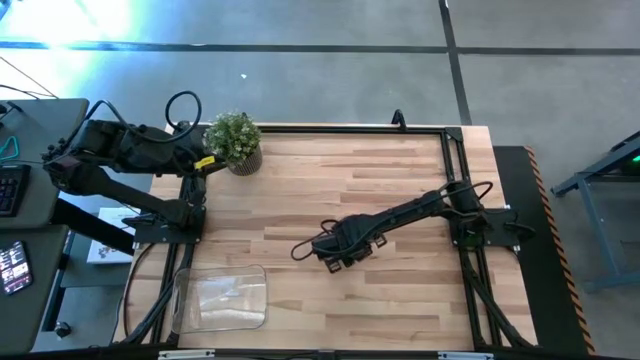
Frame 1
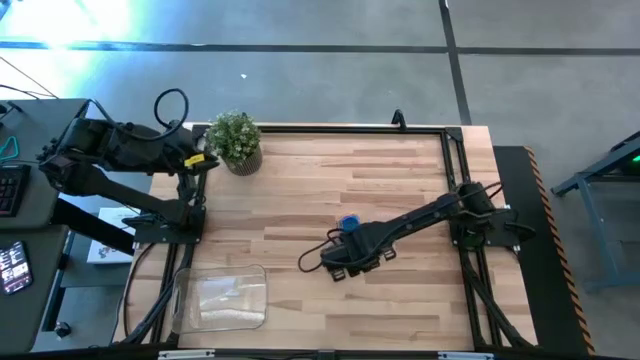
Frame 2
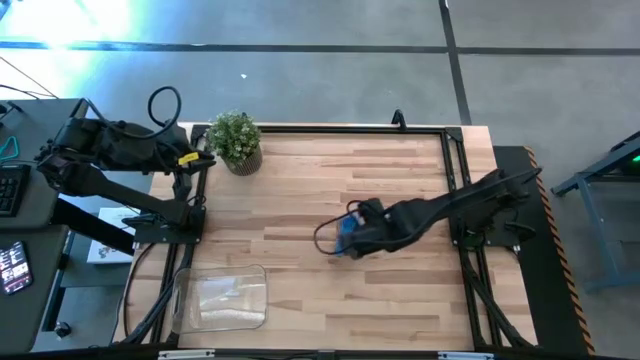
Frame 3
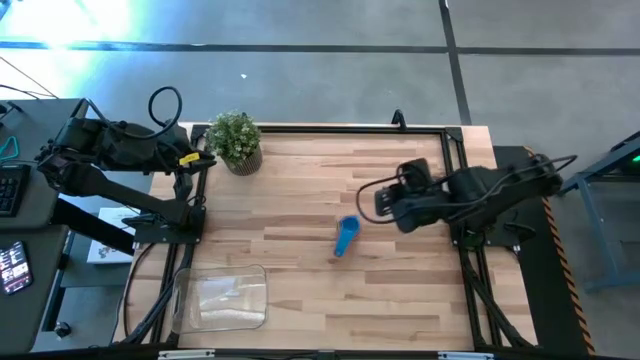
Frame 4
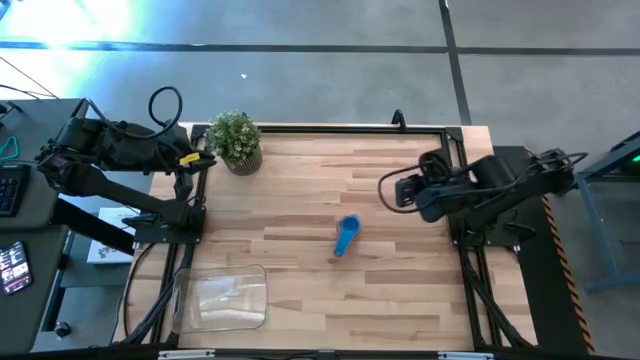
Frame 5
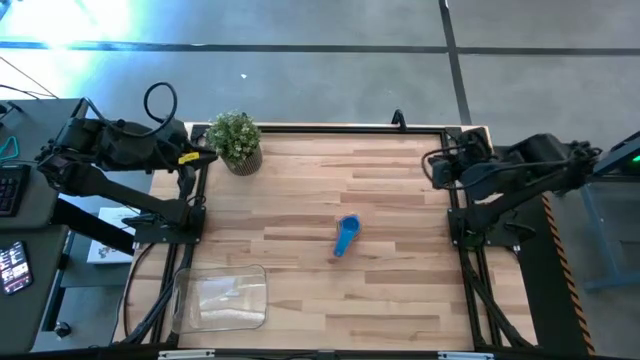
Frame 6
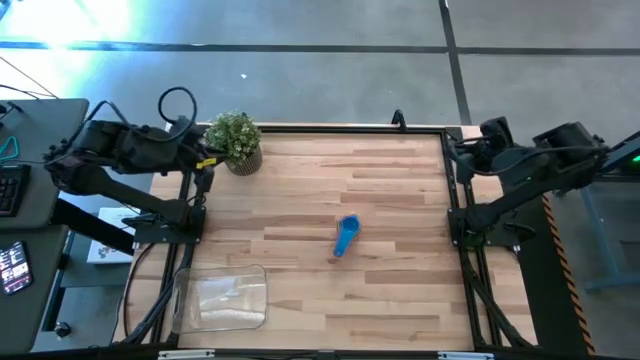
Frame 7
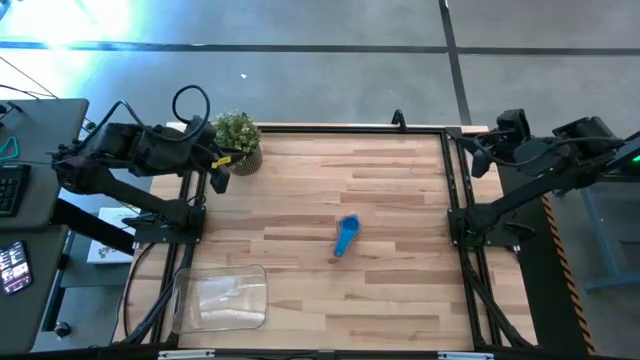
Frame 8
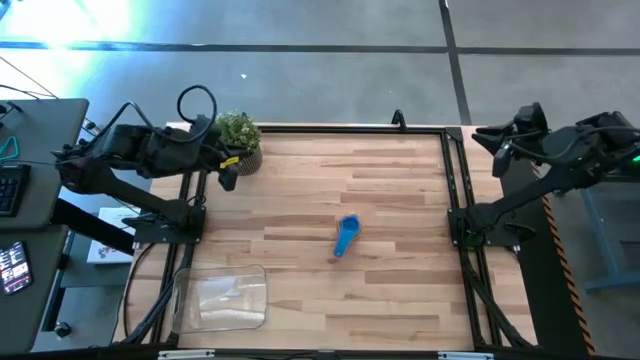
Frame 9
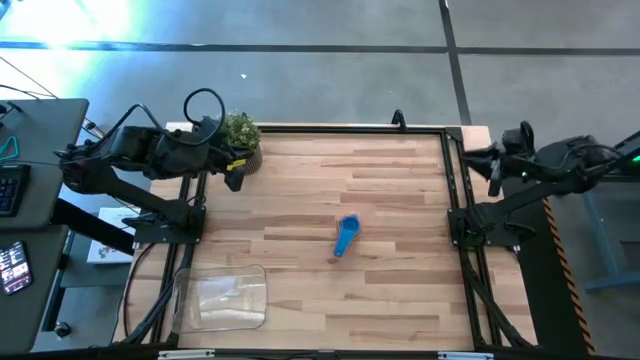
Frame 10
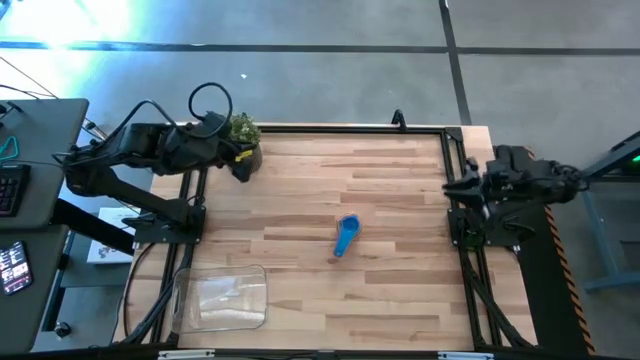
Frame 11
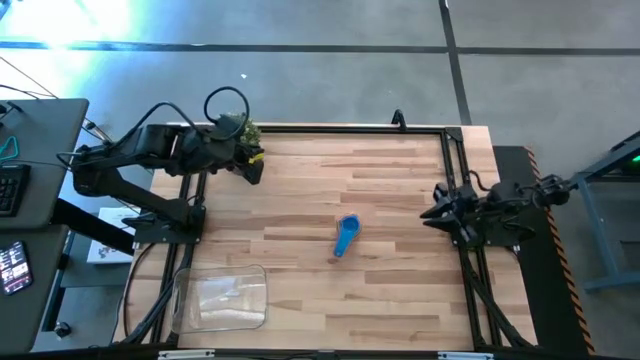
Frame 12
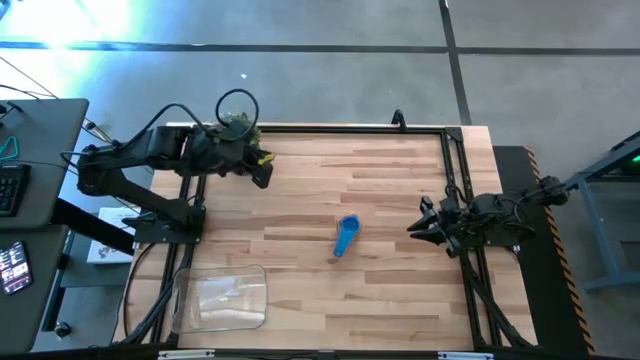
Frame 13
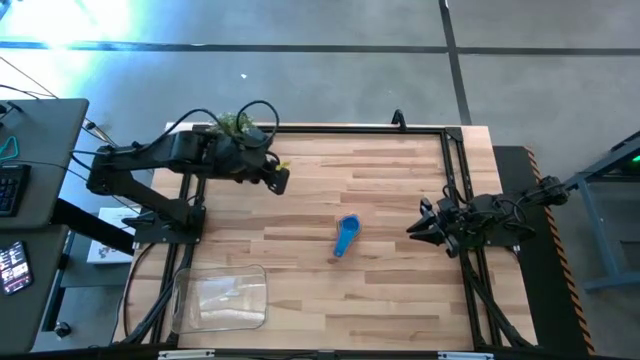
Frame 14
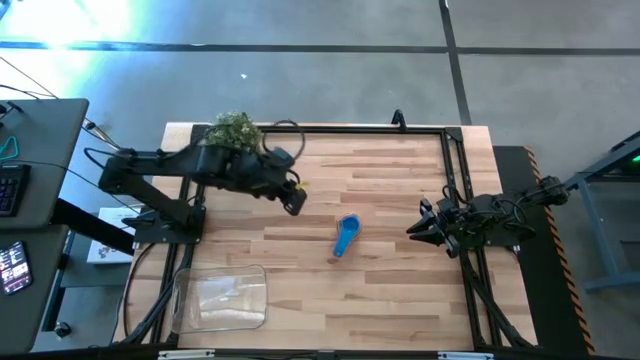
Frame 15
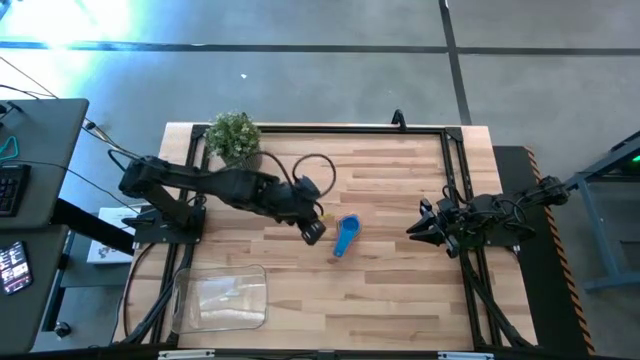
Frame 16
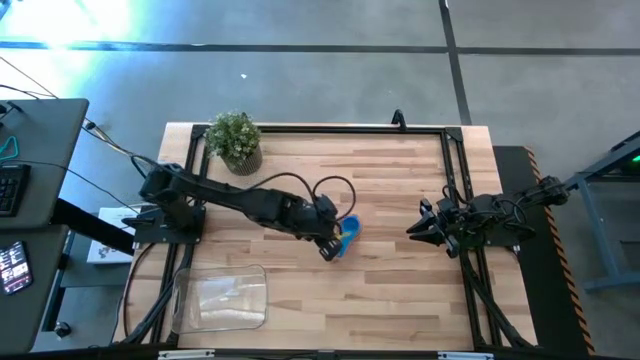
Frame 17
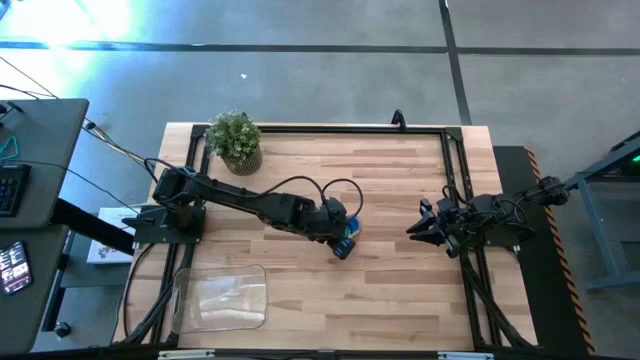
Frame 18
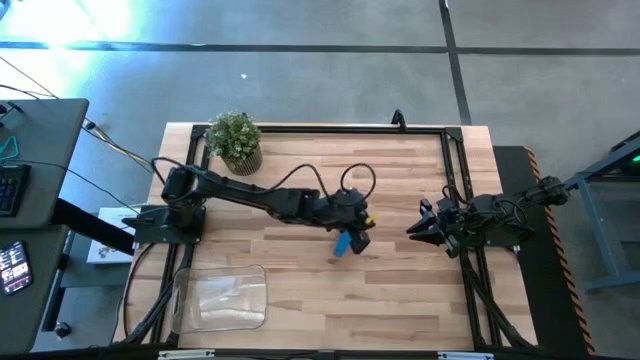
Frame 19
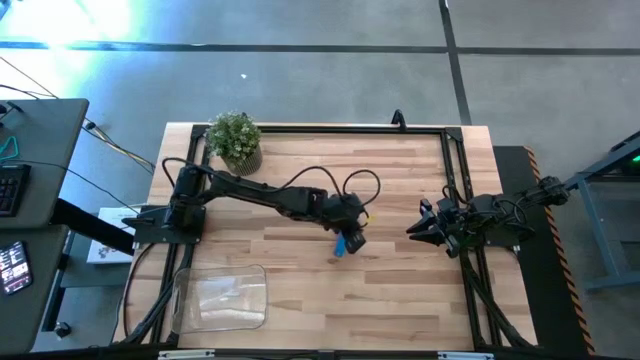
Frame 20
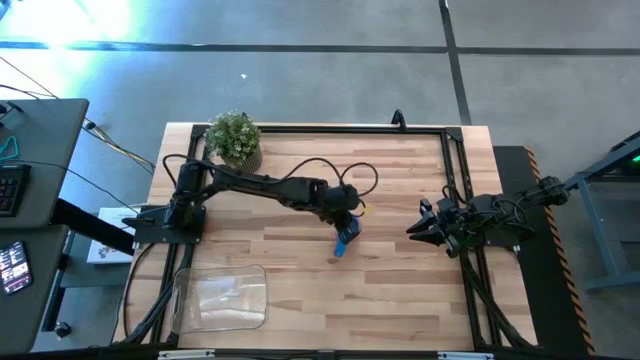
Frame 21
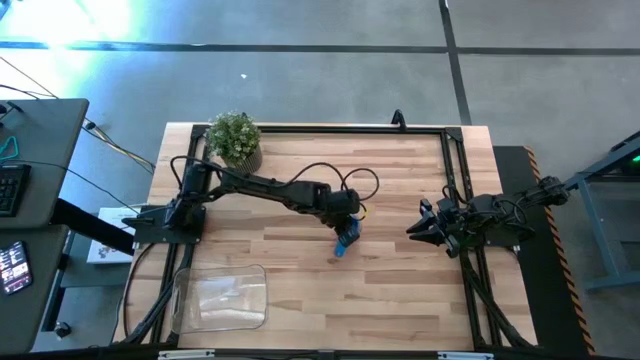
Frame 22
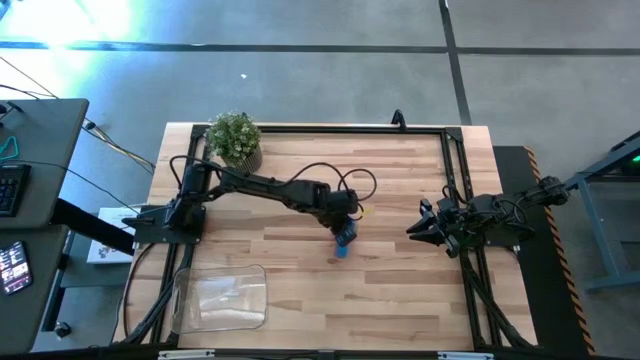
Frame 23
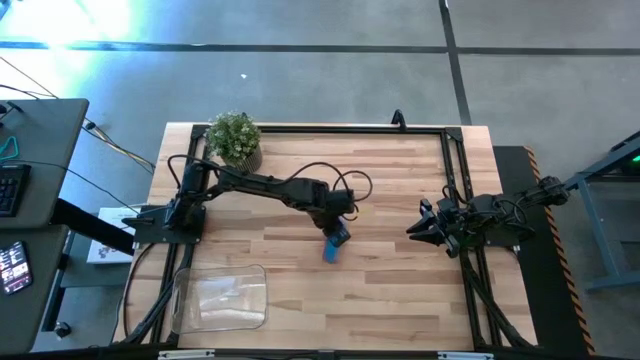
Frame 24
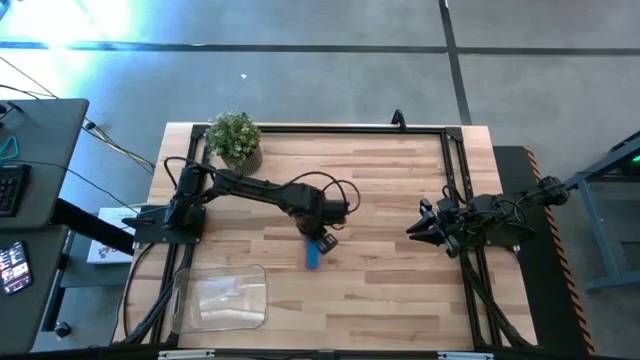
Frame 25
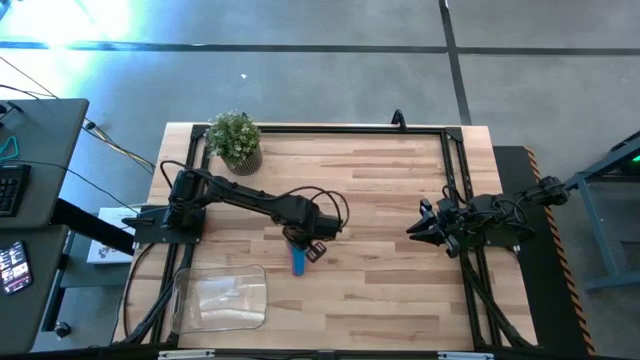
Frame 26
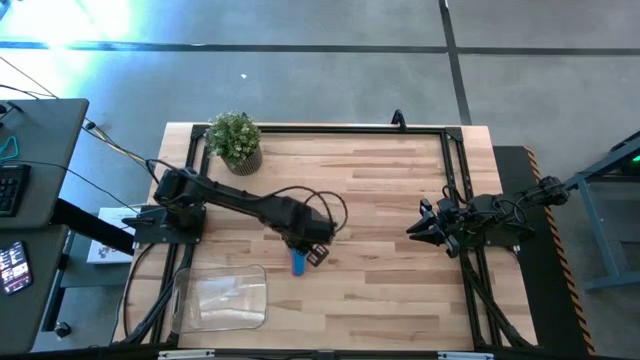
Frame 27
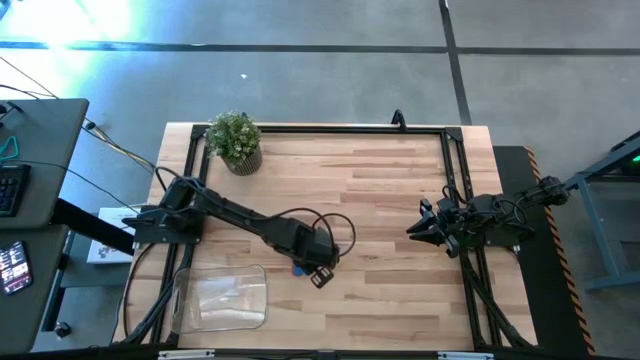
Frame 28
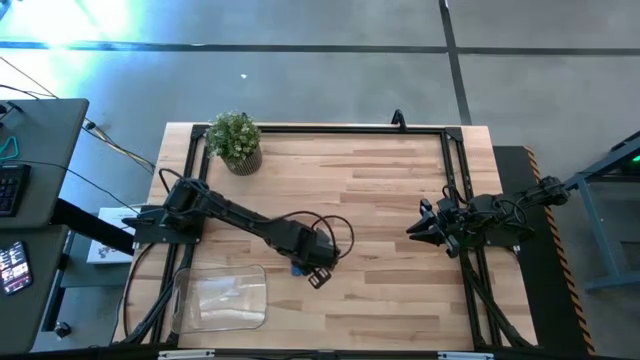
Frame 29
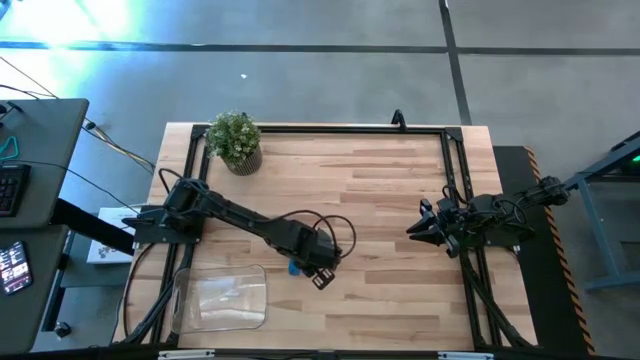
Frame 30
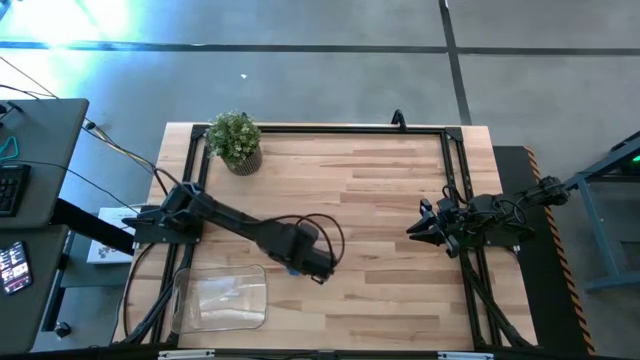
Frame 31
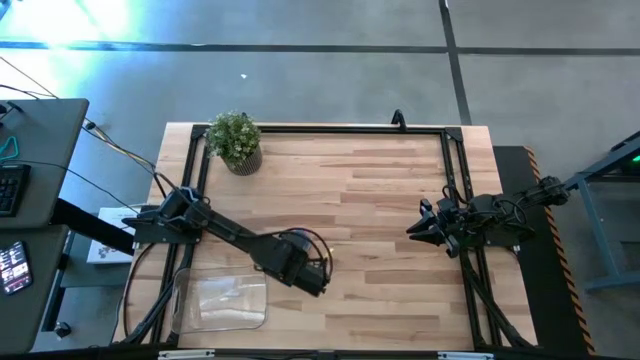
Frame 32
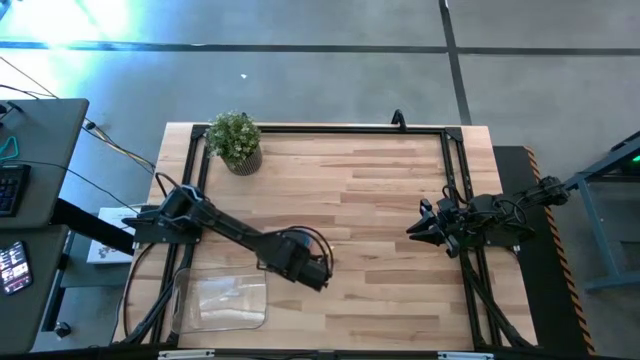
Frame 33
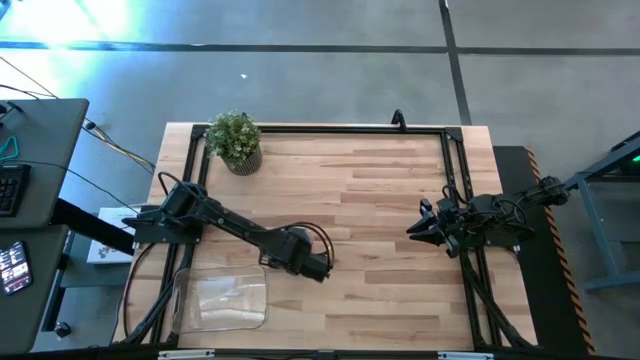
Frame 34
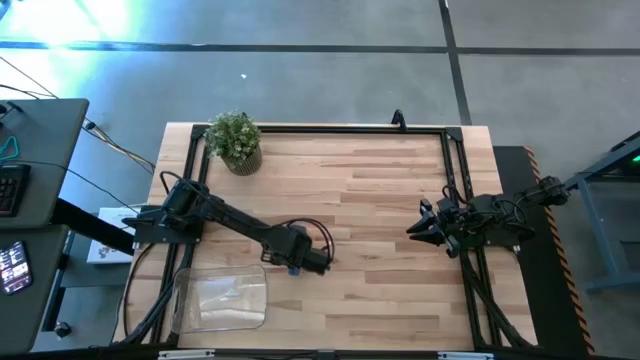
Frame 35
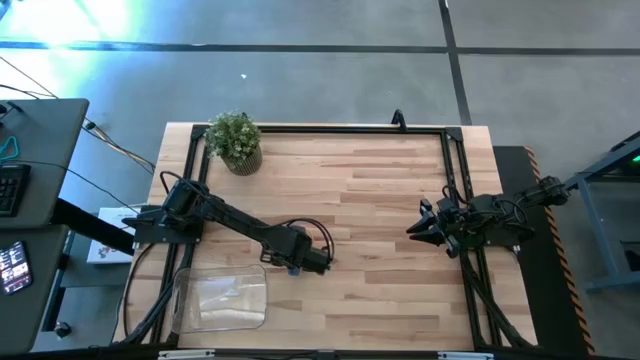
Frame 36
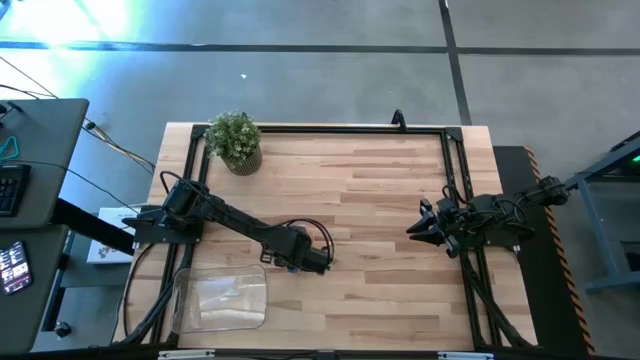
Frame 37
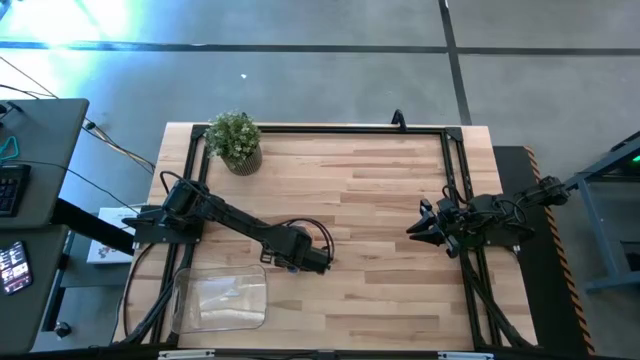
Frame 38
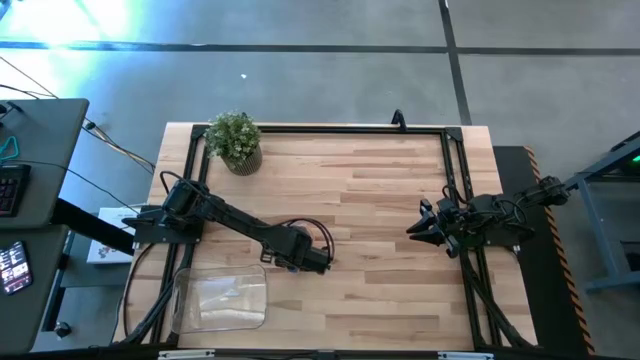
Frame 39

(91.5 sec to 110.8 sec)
Task: Nest measuring cups in basket
Put the nested measuring cups into the transparent bin

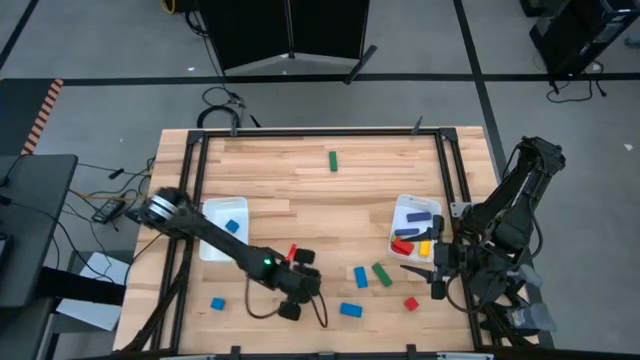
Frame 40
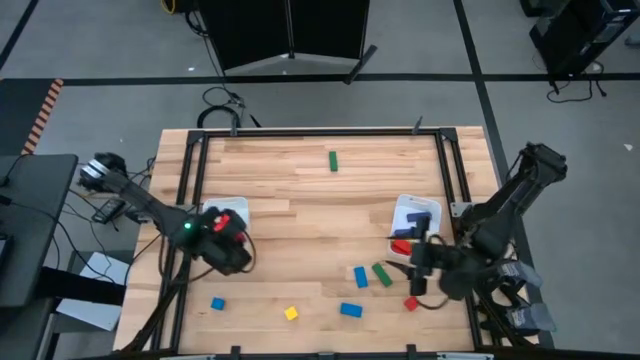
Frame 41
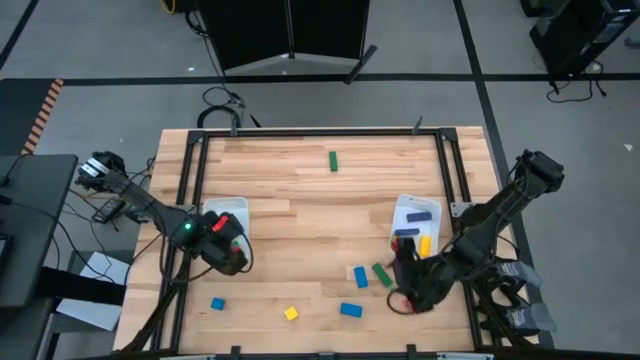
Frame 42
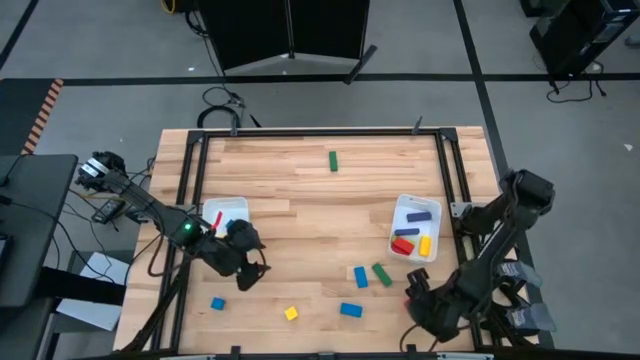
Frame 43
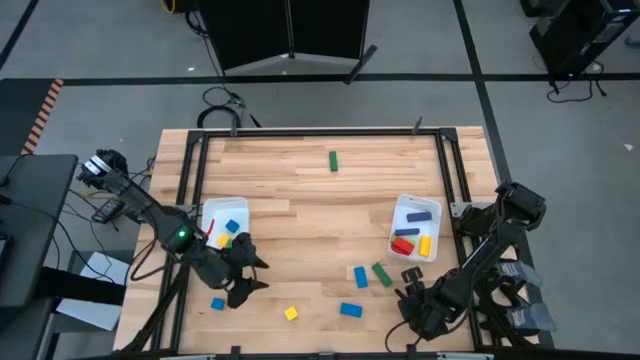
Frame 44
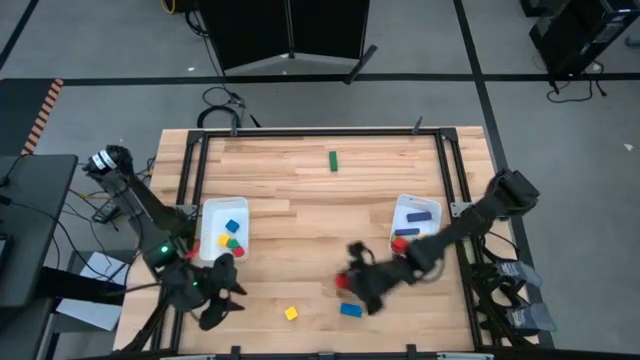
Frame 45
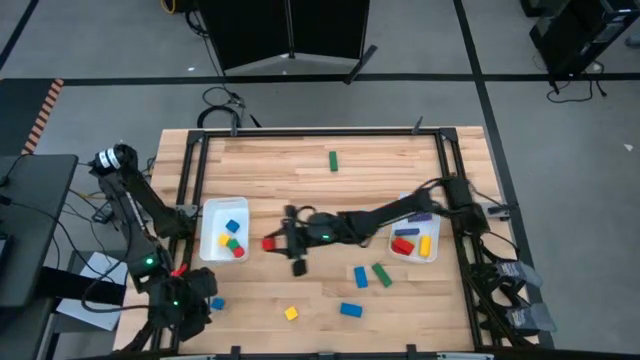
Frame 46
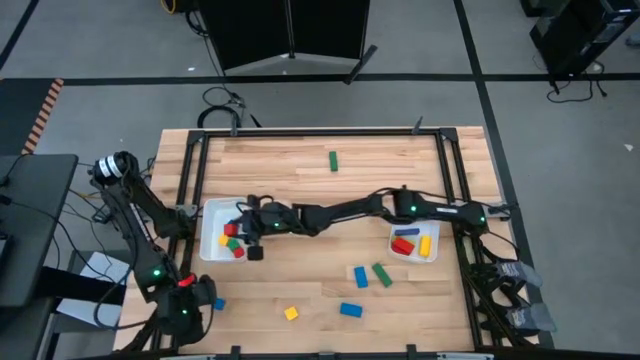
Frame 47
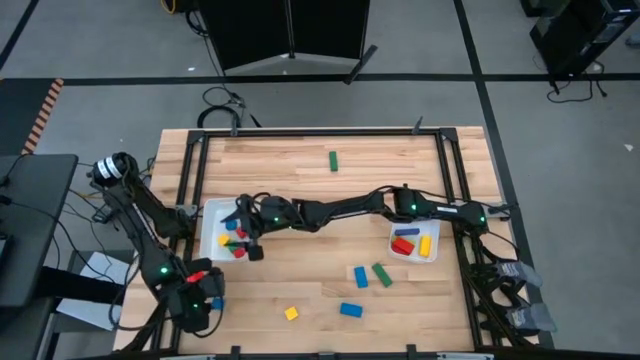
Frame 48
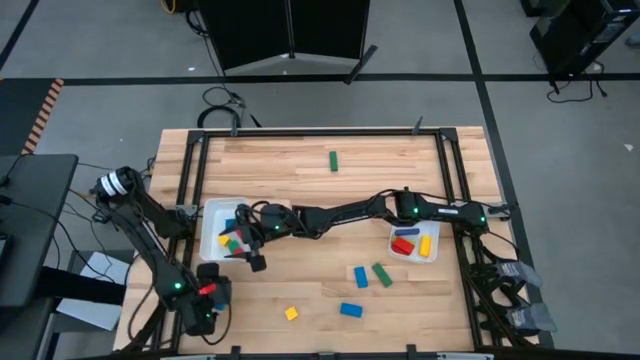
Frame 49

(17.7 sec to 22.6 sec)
Task: Sort blocks by size
Put the red game piece into the left bin
